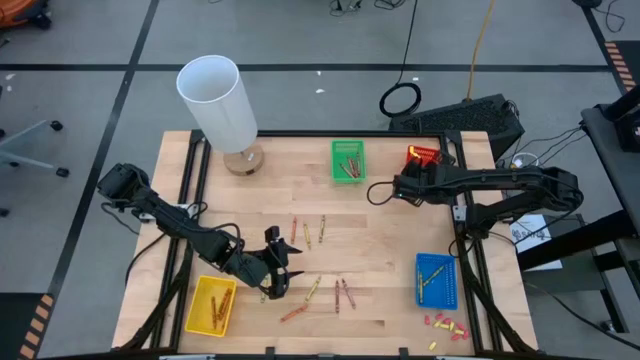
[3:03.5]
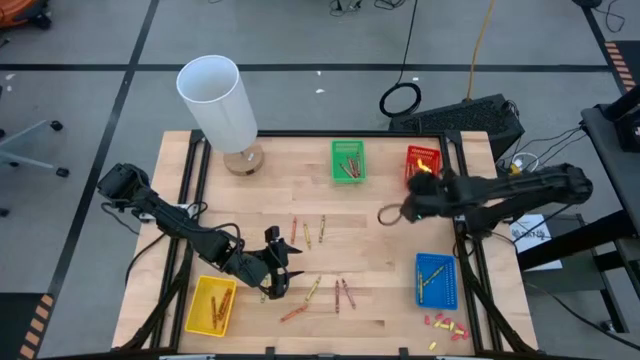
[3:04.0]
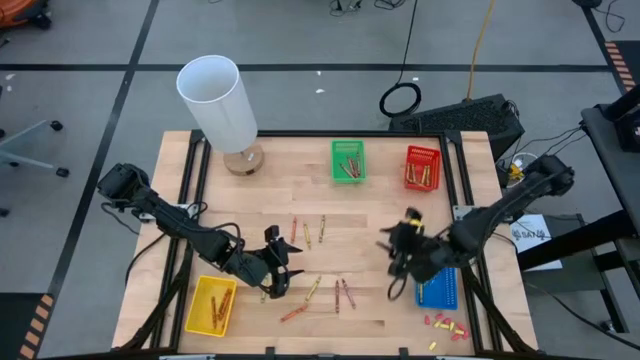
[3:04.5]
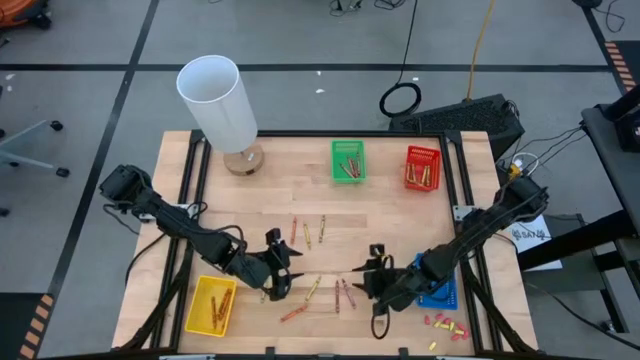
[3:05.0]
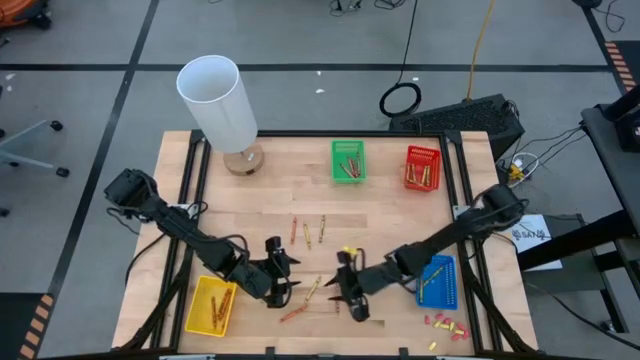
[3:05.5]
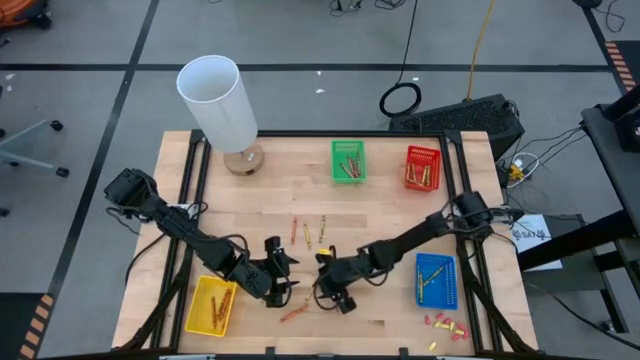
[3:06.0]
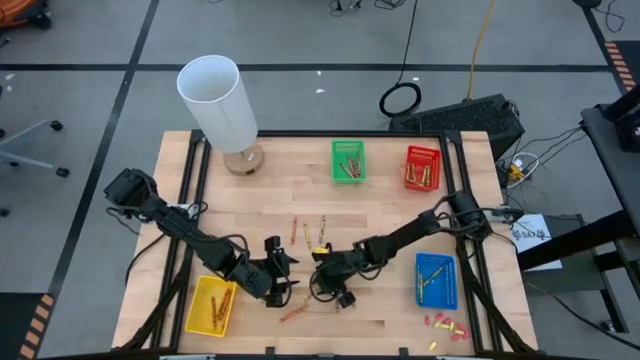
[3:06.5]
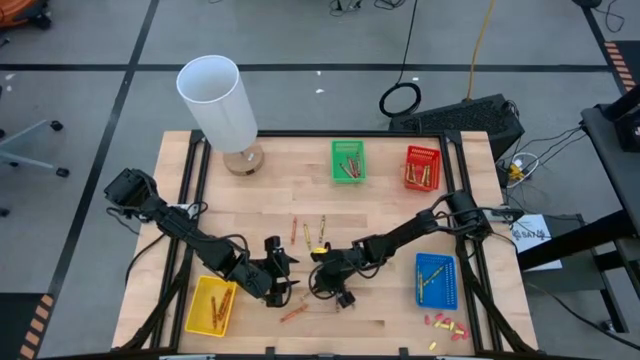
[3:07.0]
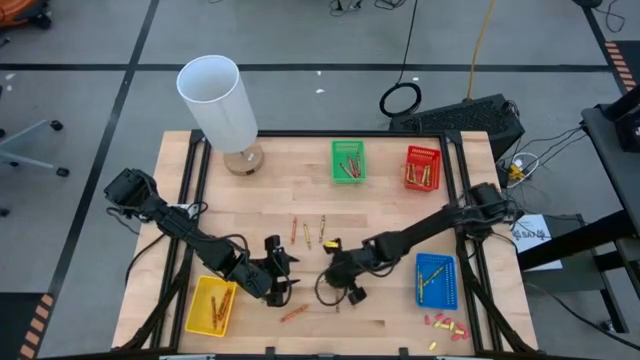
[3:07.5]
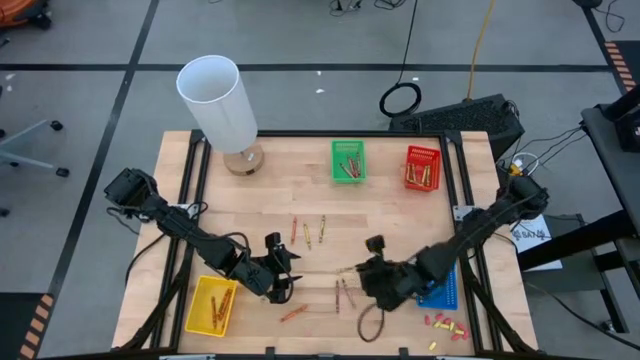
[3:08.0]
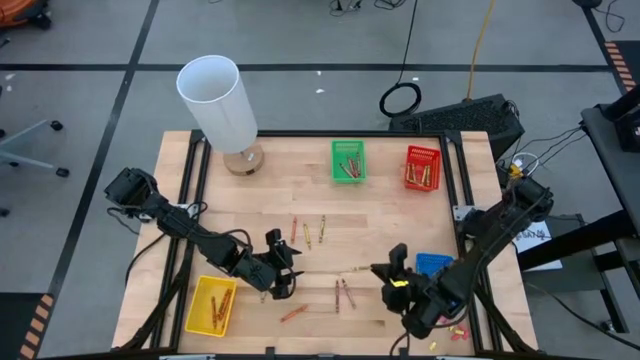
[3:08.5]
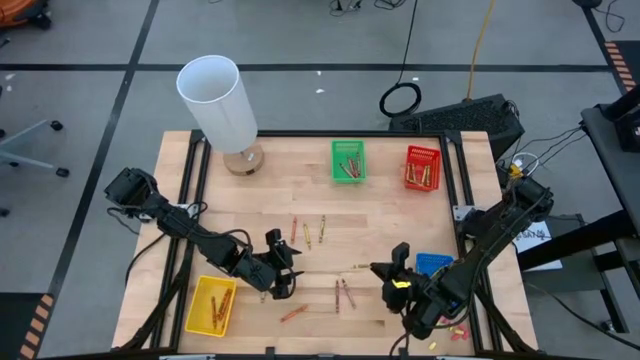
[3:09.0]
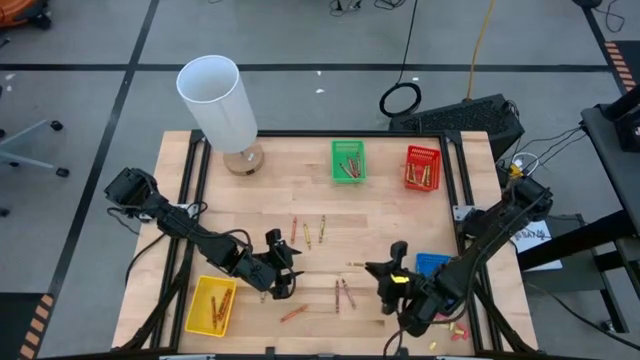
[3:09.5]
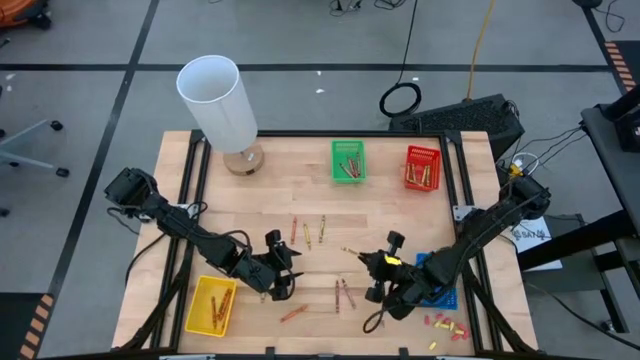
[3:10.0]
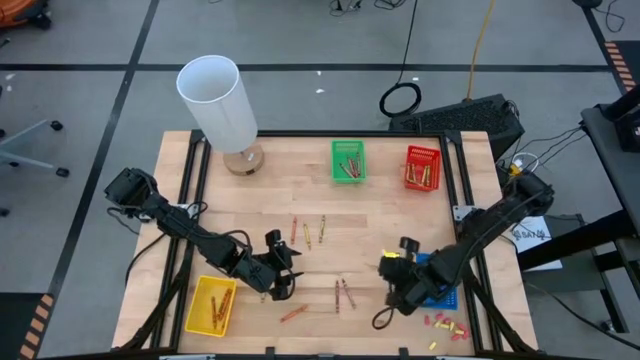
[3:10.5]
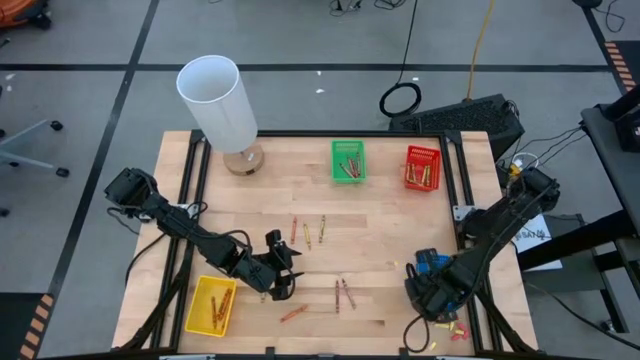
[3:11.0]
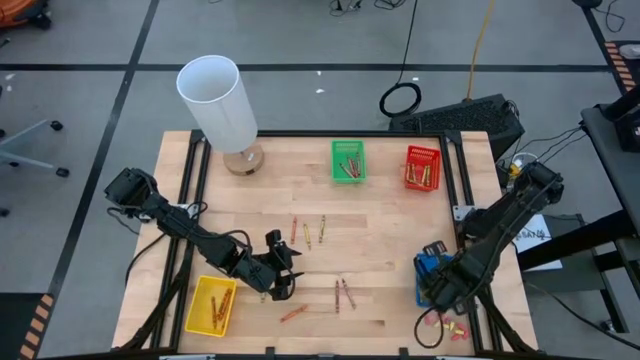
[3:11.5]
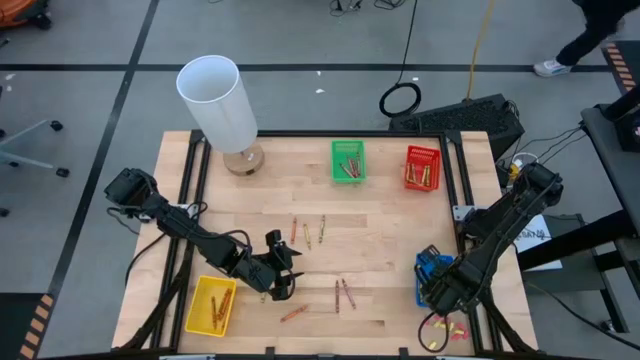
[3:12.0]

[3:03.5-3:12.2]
Task: Sort crayons
Put the yellow crayon into the blue bin

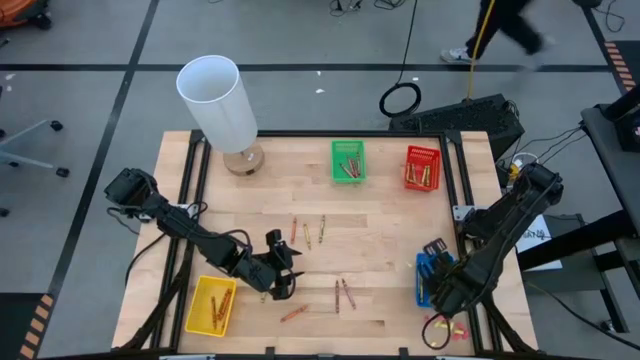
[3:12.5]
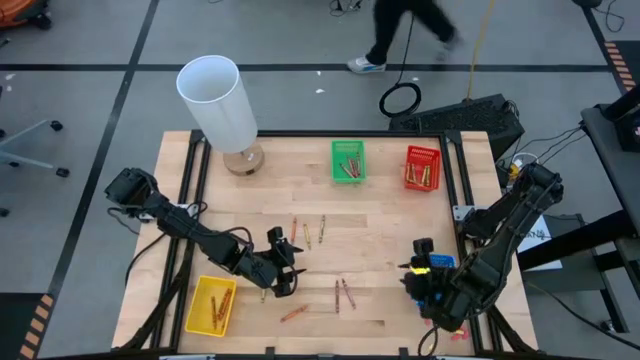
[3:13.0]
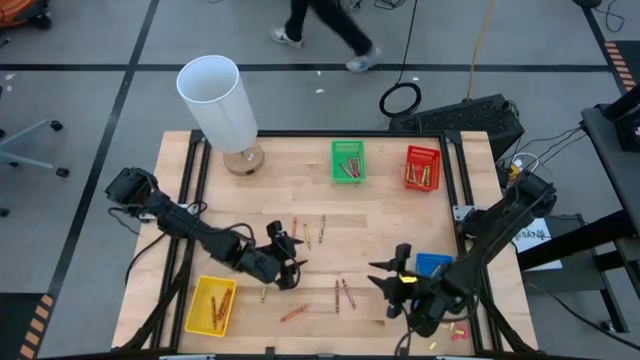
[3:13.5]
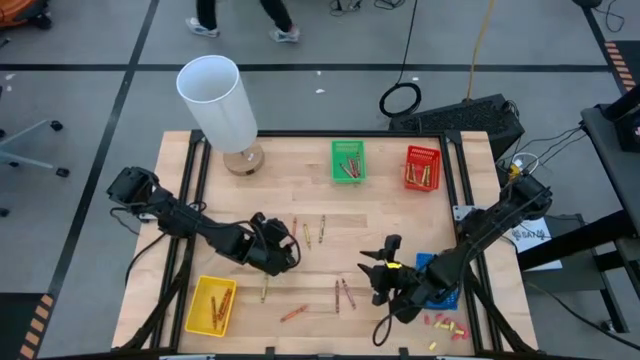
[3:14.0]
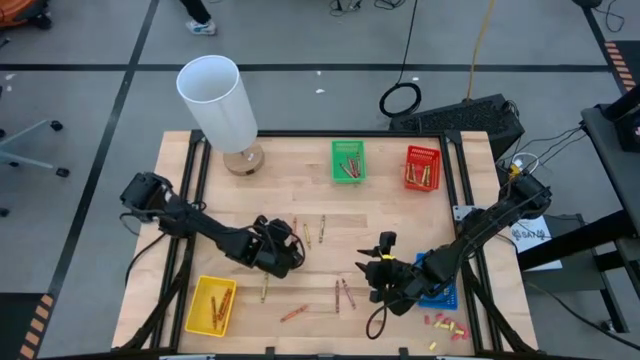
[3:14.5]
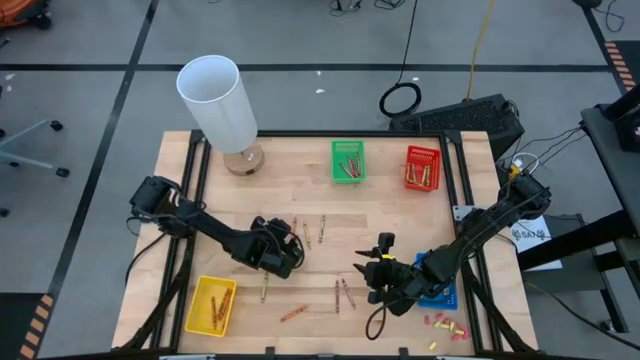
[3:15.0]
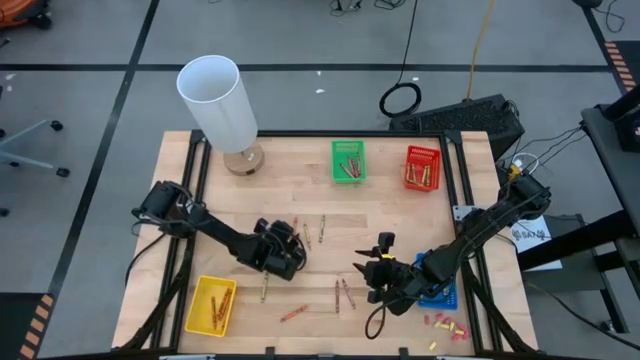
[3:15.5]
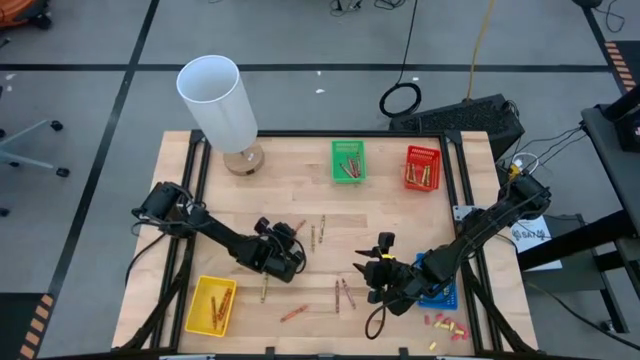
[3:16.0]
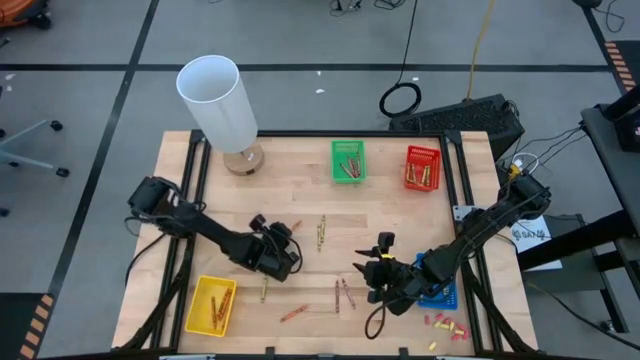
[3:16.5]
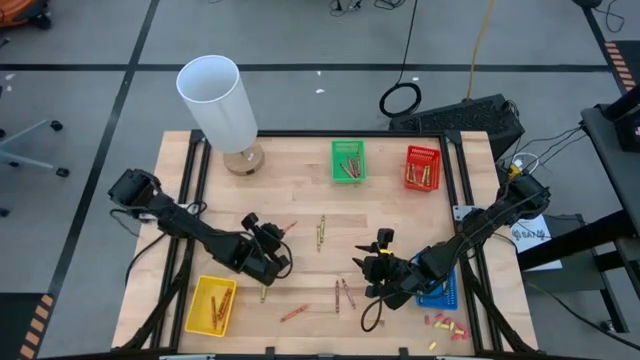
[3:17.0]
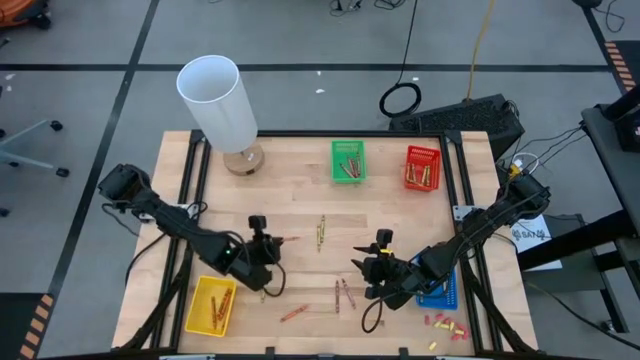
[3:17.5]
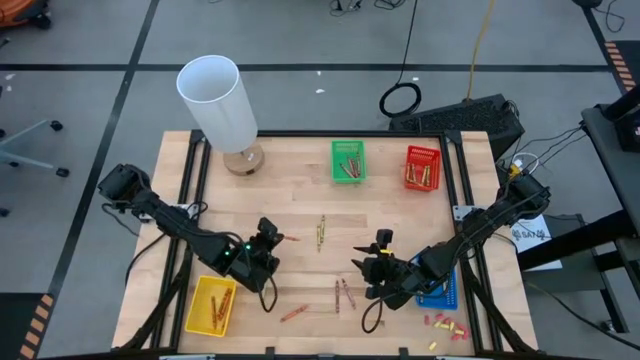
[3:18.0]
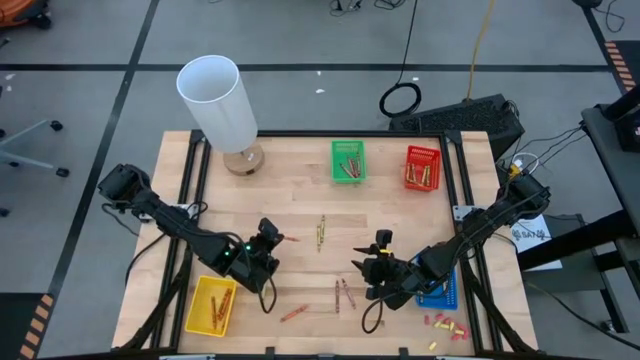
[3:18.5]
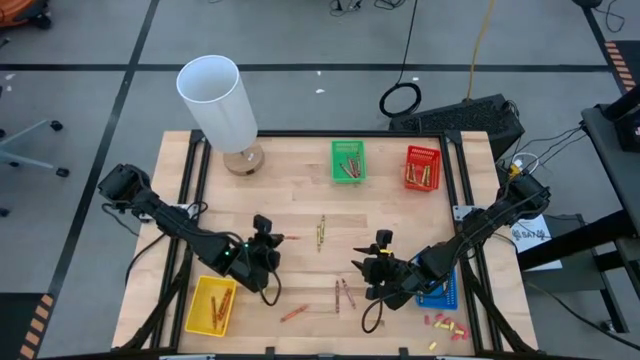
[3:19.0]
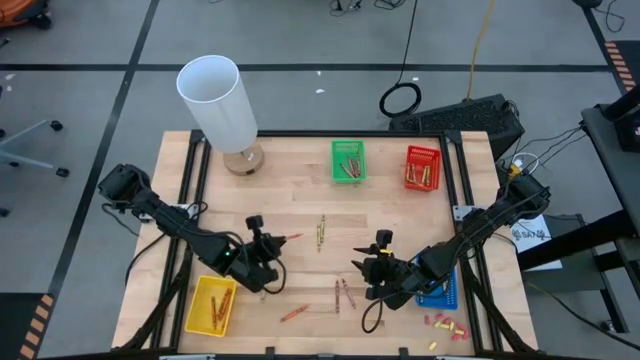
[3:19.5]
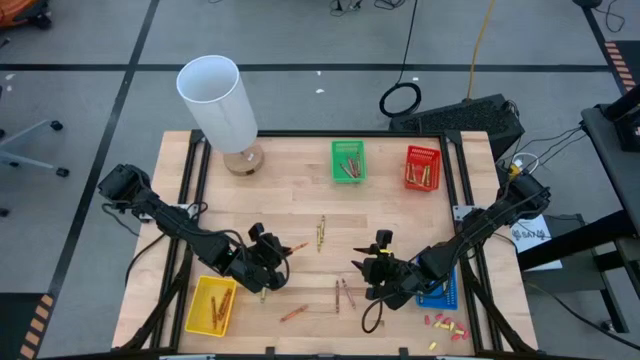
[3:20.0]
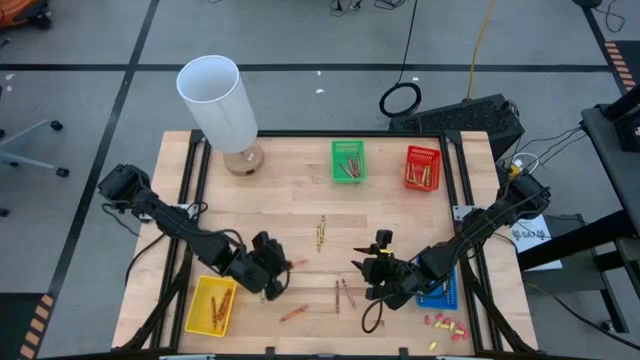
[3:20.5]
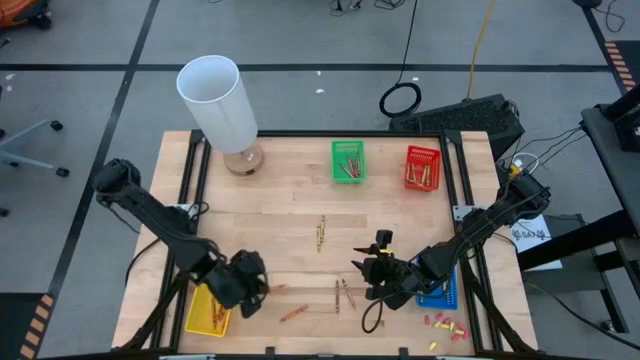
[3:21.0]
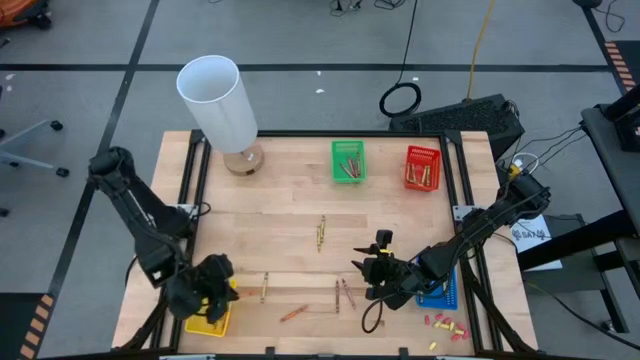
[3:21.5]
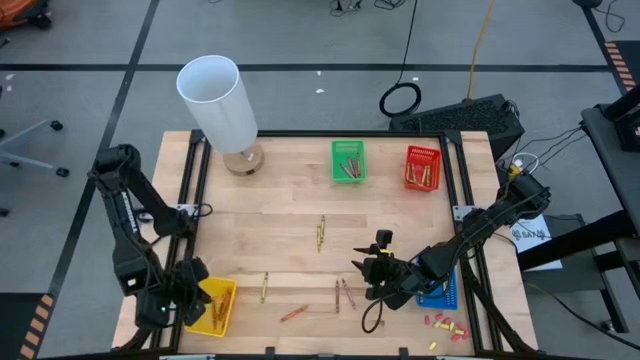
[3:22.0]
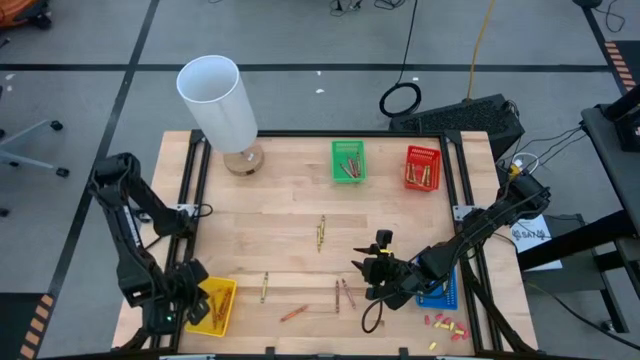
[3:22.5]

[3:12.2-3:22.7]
Put the orange crayon into the yellow bin
